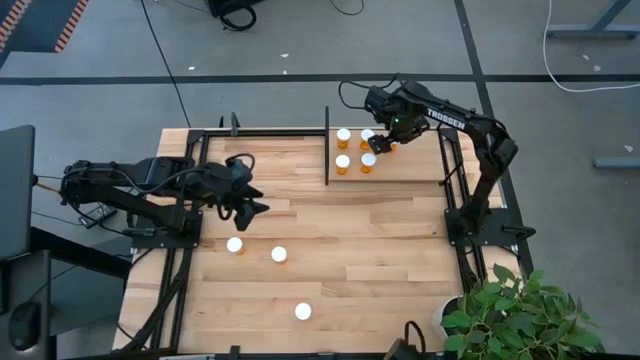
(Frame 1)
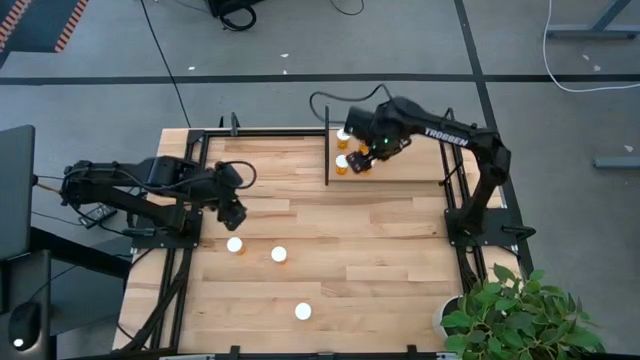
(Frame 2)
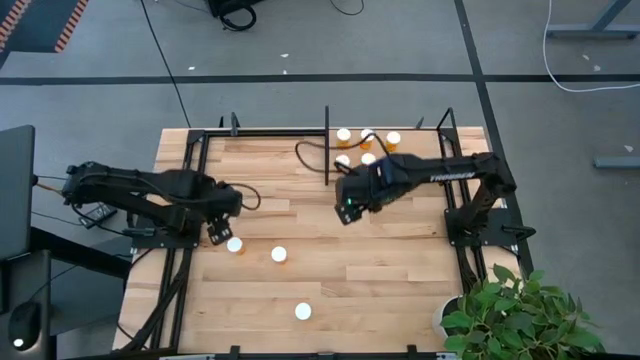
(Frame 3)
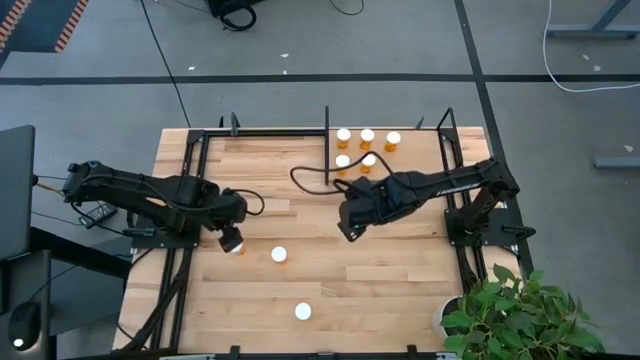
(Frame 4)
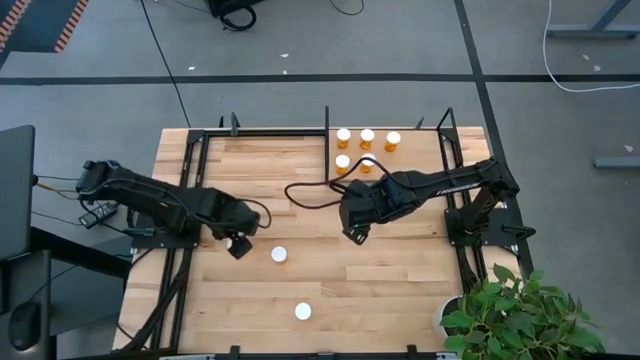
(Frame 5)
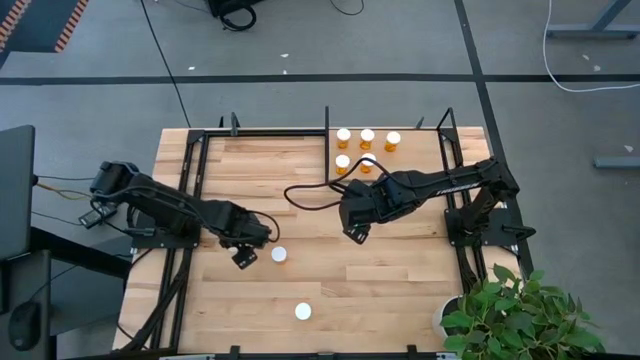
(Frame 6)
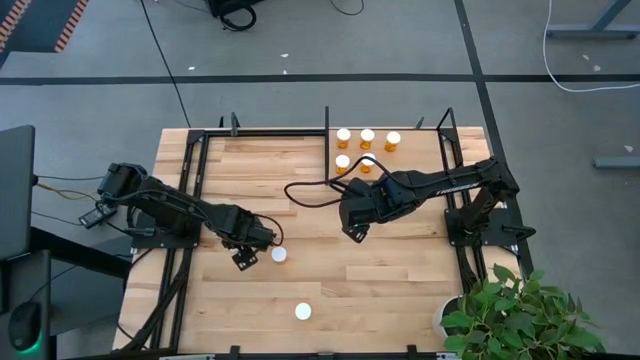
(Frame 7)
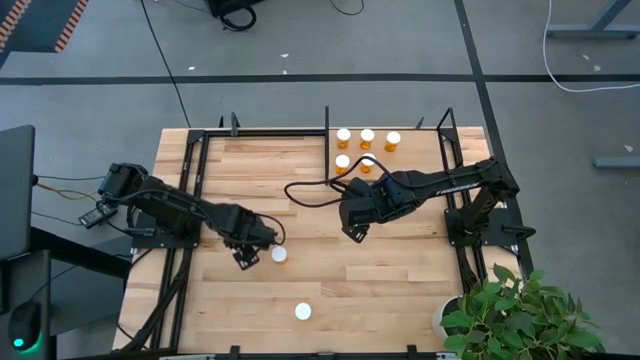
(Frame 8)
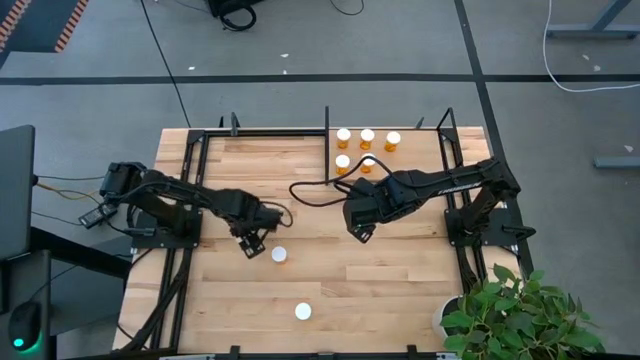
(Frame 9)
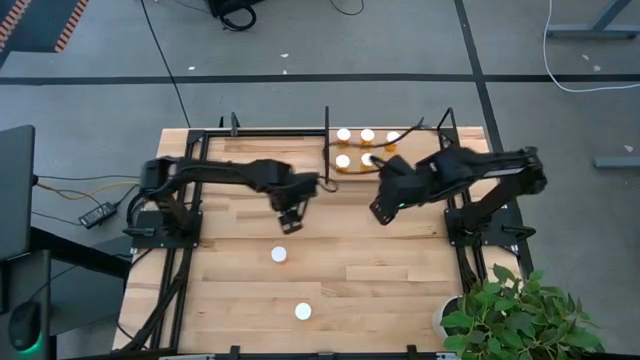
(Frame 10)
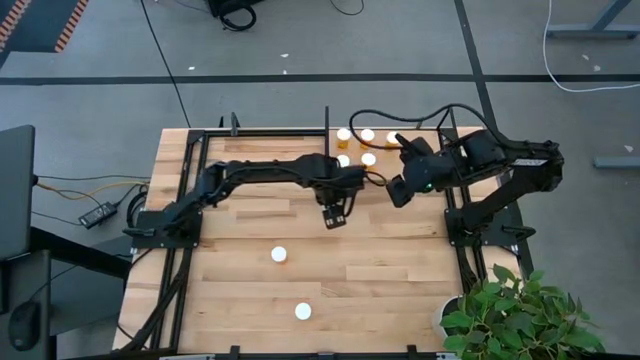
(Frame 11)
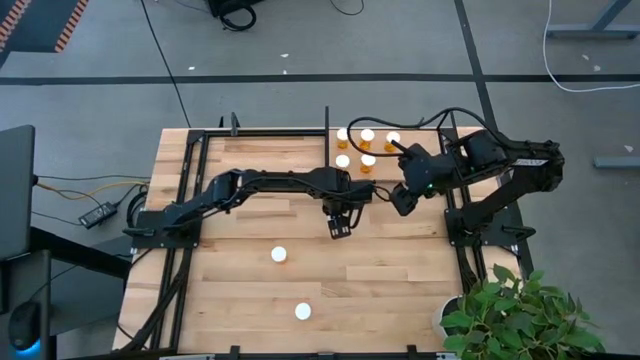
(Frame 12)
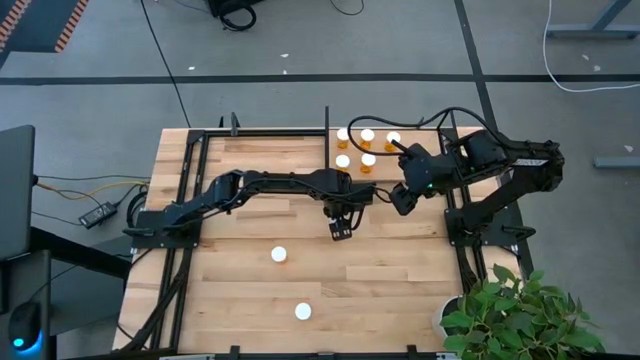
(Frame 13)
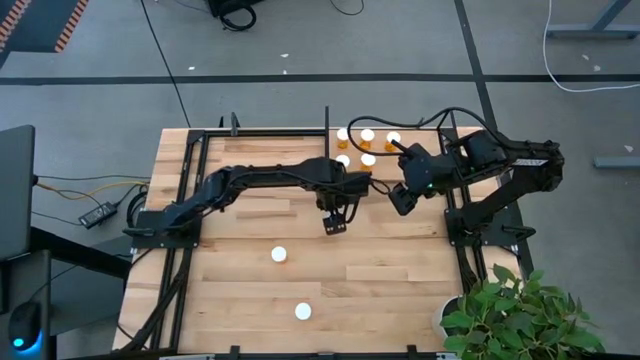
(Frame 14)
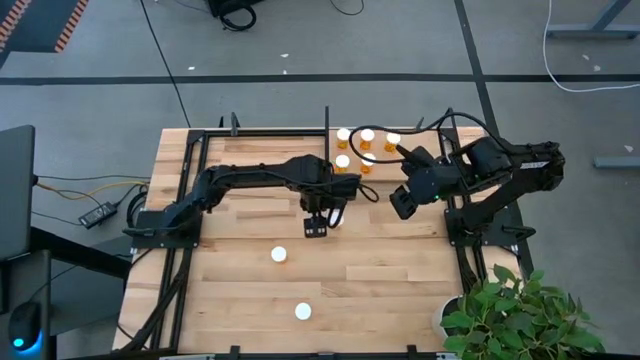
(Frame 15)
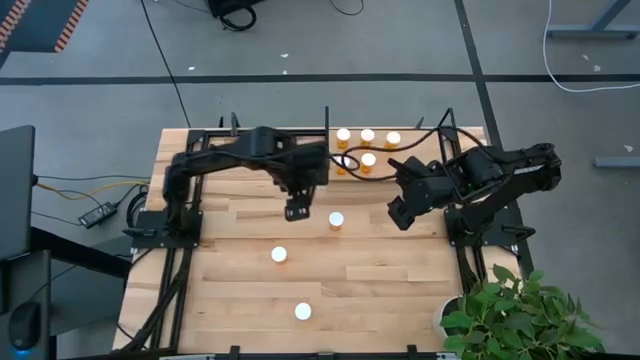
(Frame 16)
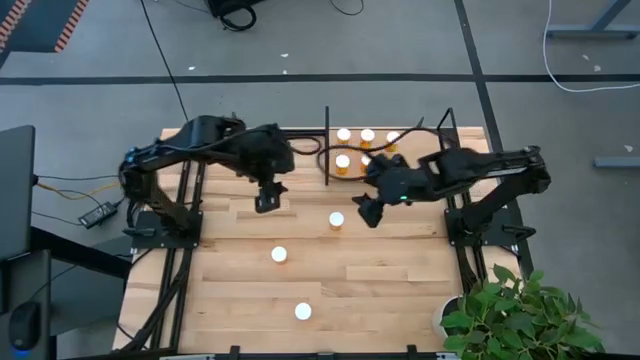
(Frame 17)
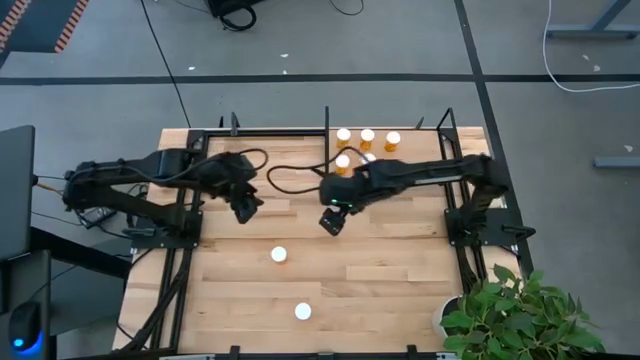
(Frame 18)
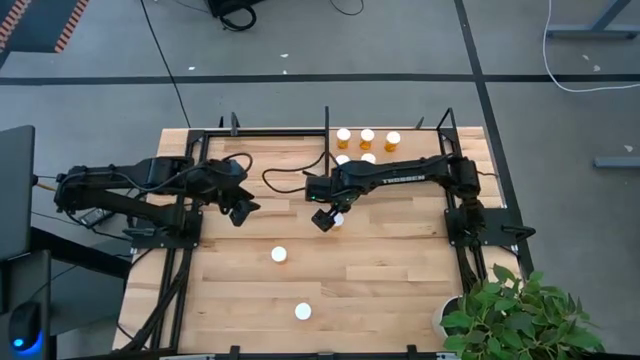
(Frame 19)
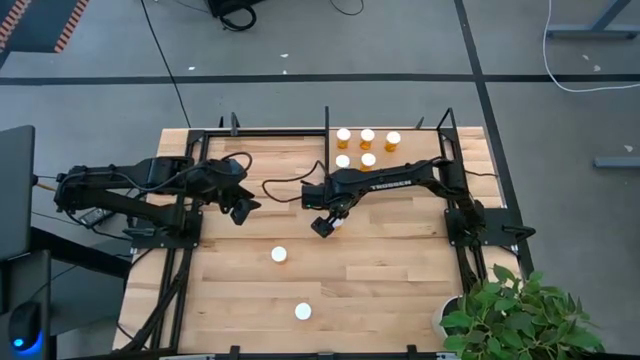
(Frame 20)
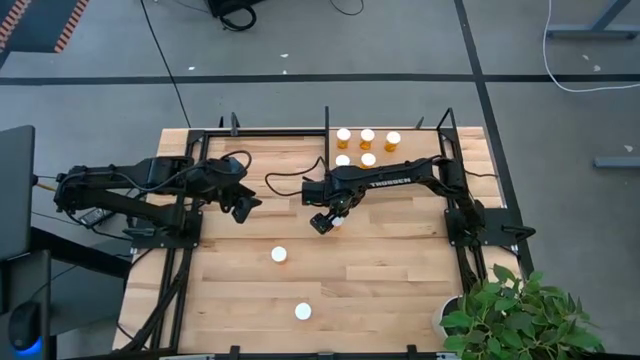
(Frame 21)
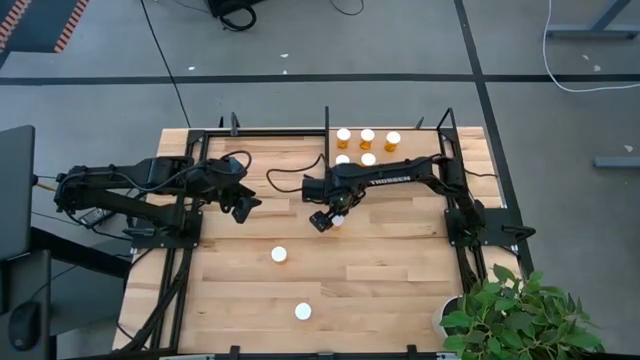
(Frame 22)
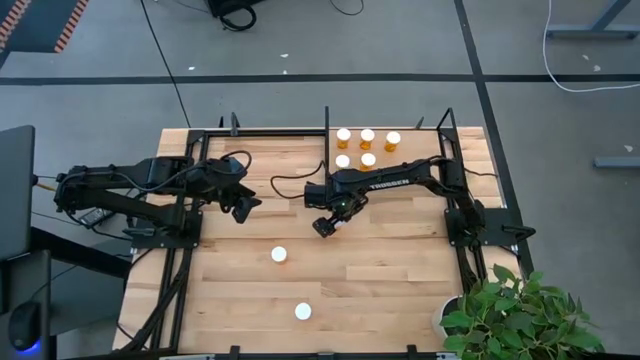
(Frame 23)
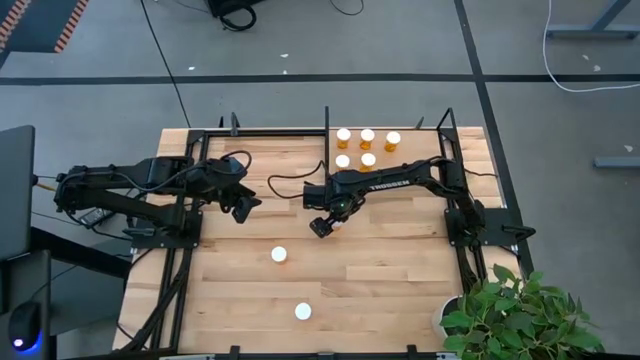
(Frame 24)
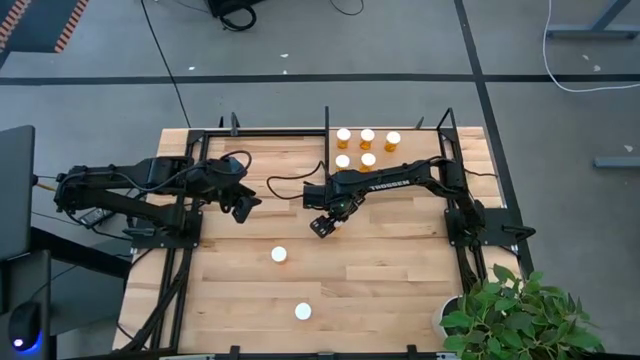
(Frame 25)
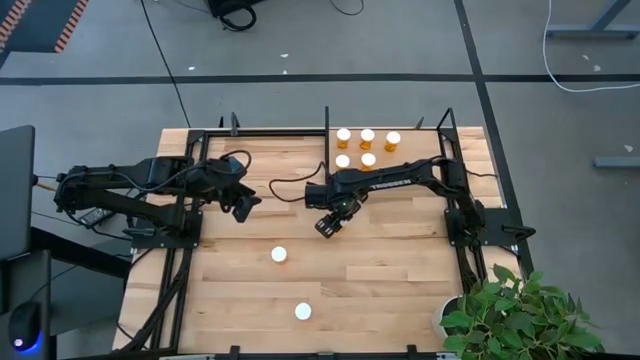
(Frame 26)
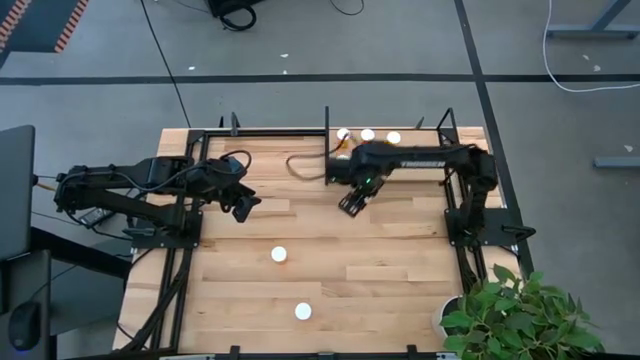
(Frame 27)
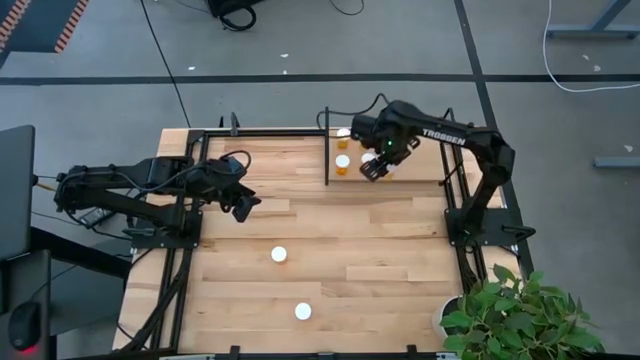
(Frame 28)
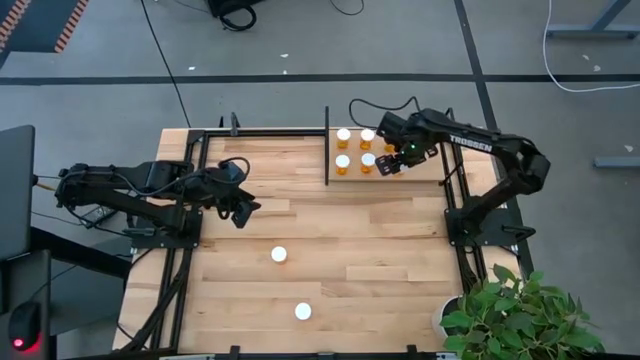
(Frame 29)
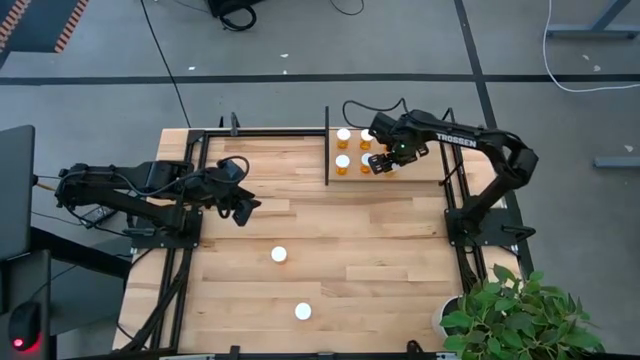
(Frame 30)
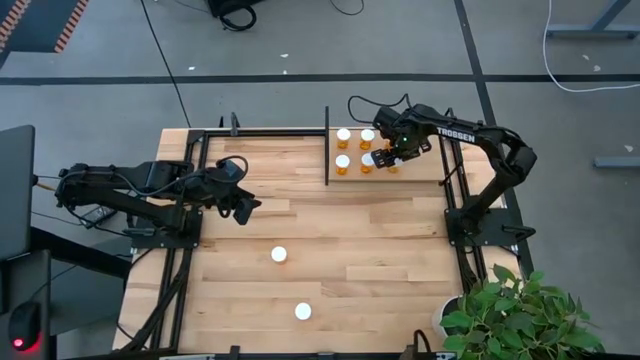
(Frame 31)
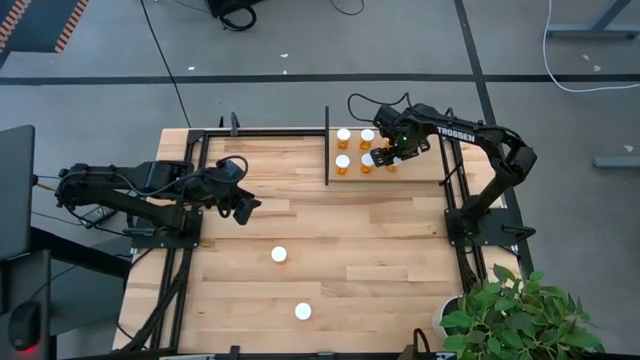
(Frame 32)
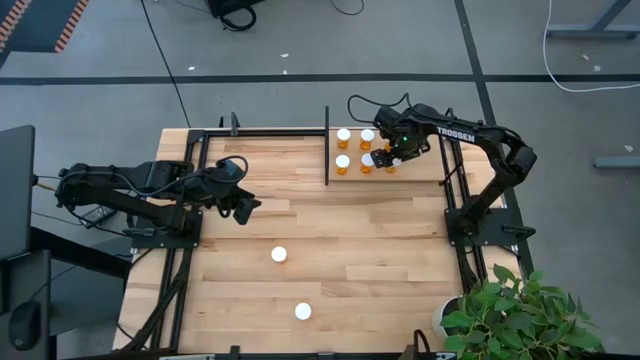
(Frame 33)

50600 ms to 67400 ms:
Task: Pick and place medicine bottles onto shelf by color
Put the orange pill bottle on the shelf

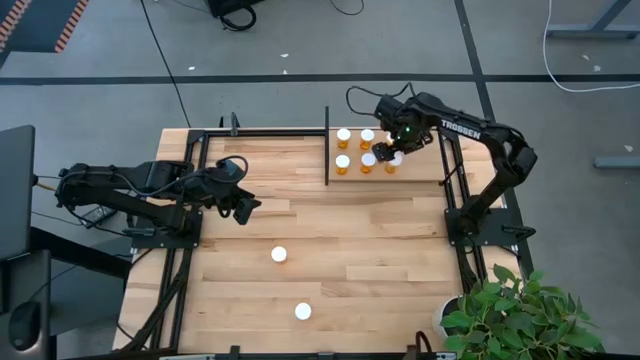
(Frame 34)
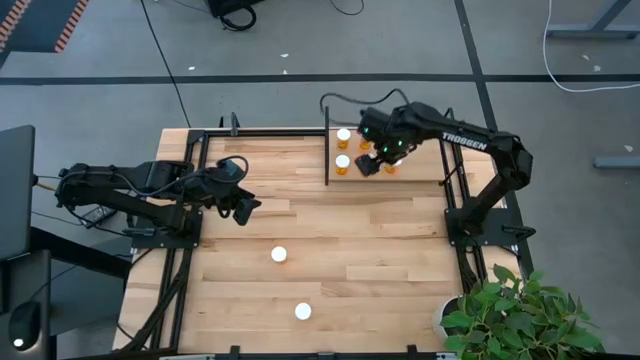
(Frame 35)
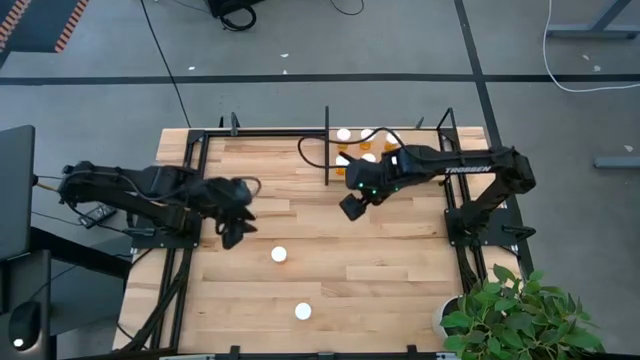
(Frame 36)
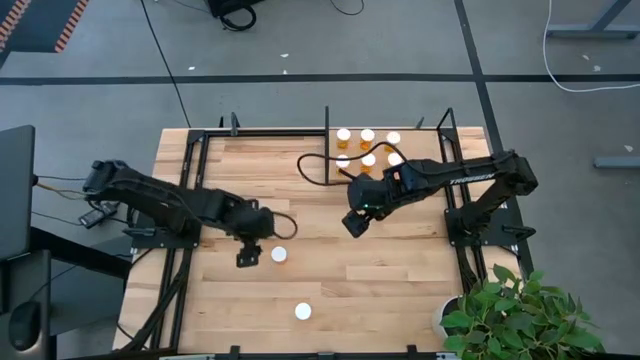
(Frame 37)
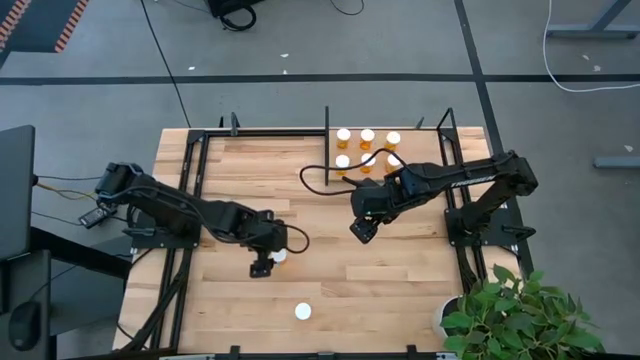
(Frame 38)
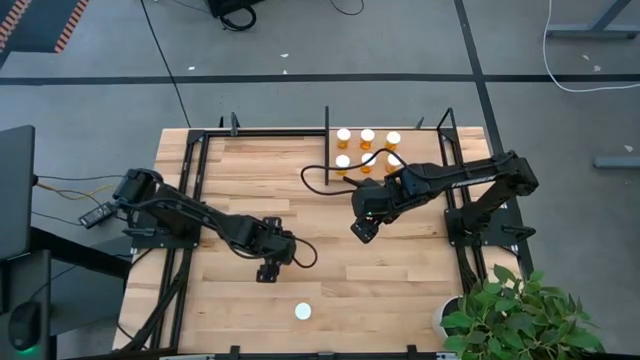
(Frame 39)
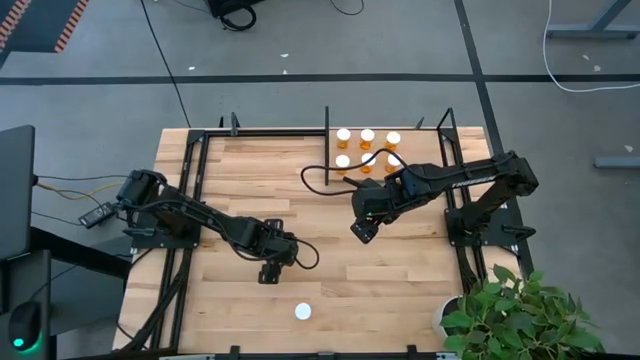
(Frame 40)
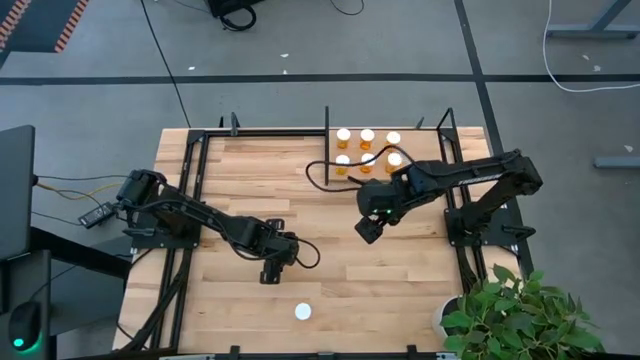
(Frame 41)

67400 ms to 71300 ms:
Put the orange pill bottle on the shelf

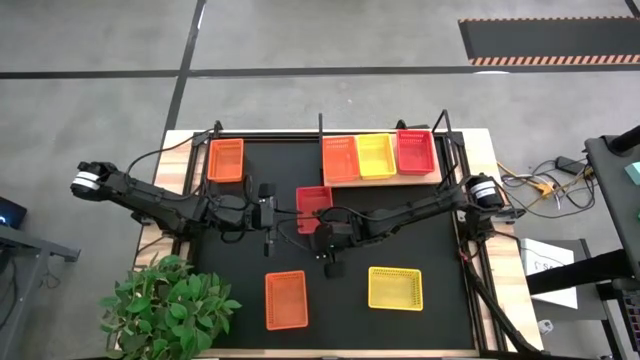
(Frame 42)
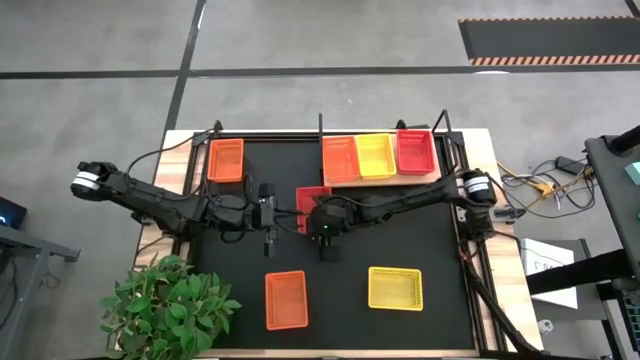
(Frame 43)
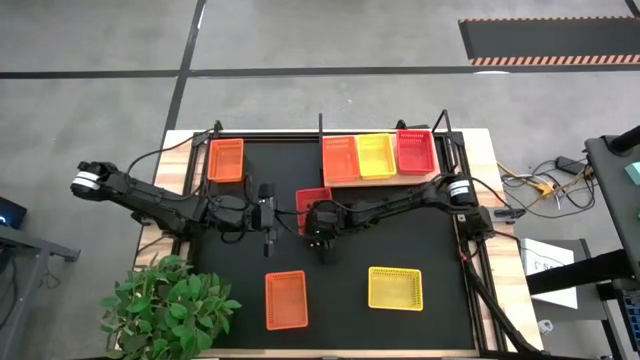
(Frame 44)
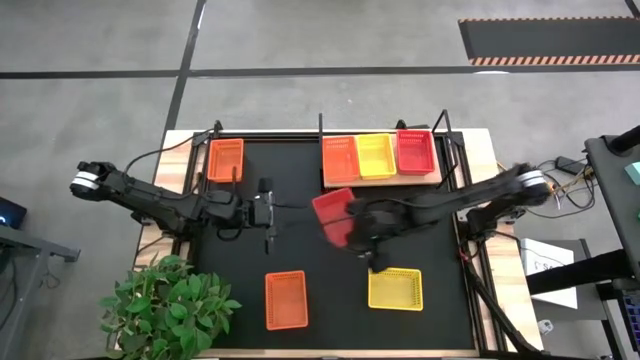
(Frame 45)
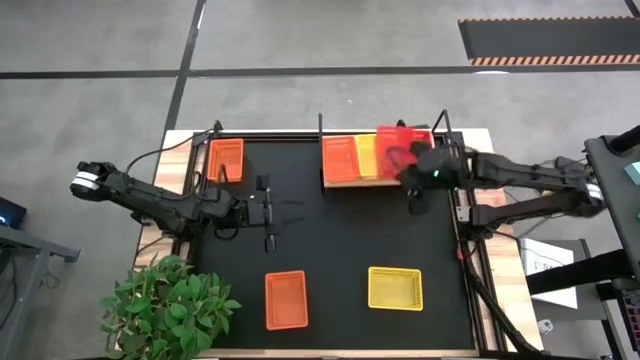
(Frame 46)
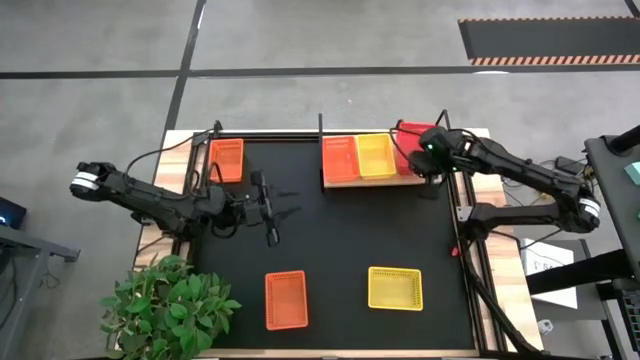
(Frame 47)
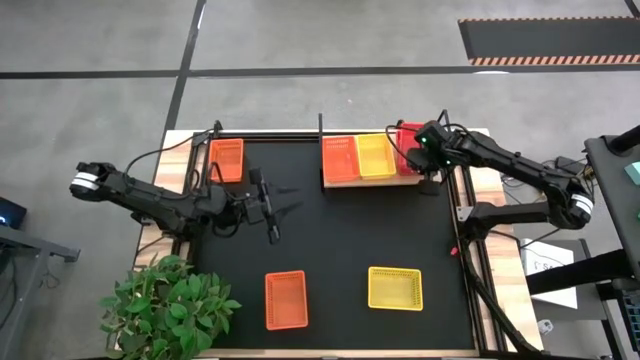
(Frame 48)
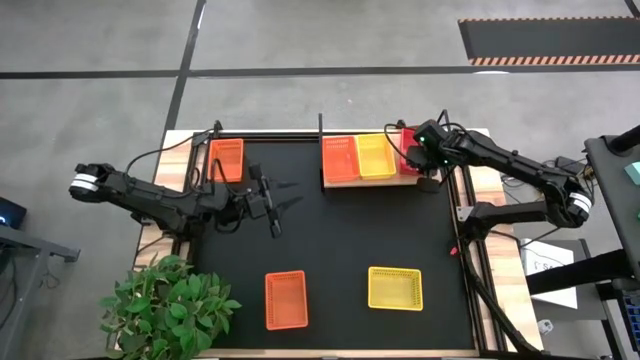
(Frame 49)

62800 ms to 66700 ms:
Task: Stack baskets on shelf by color
Stack the red bin on the stacked red bins on the shelf
